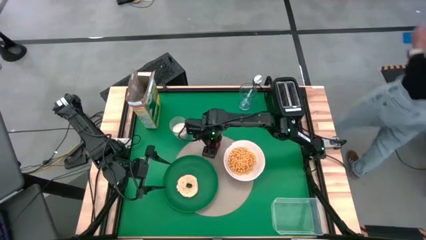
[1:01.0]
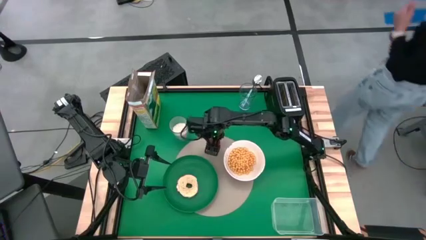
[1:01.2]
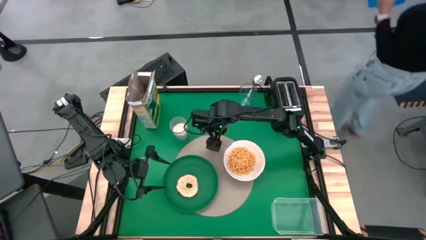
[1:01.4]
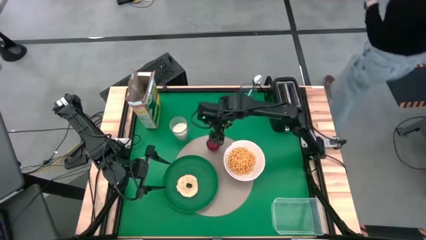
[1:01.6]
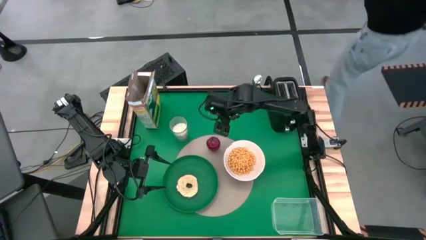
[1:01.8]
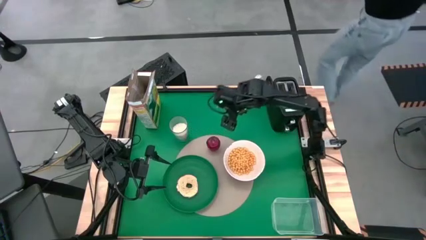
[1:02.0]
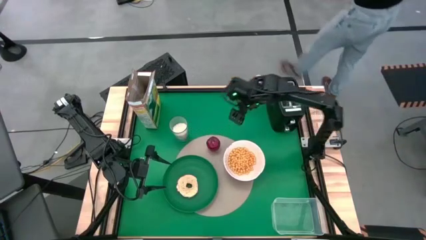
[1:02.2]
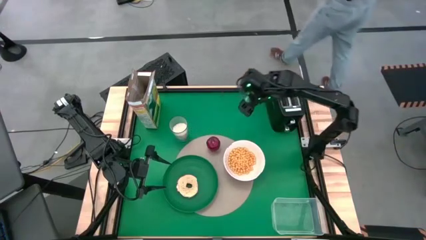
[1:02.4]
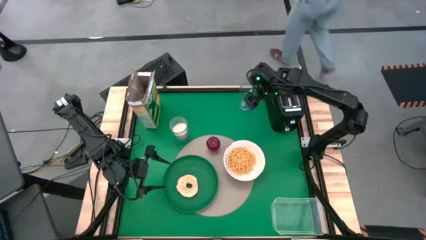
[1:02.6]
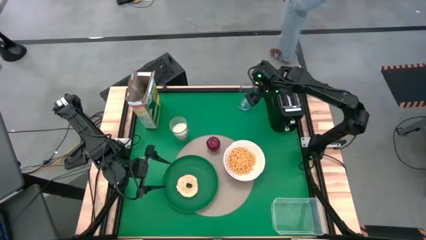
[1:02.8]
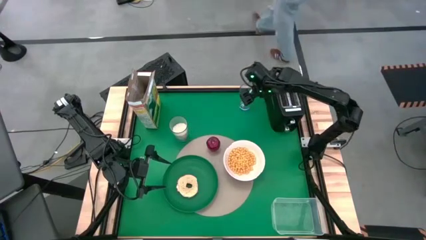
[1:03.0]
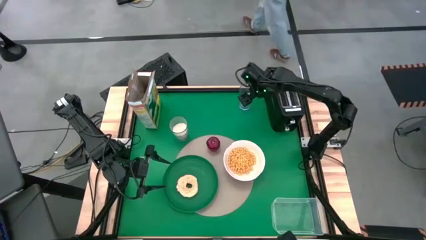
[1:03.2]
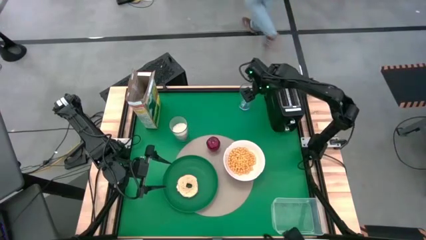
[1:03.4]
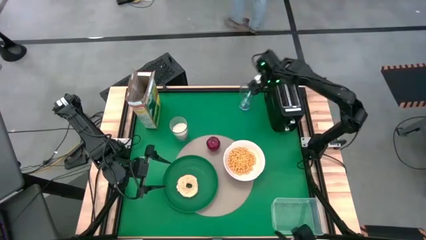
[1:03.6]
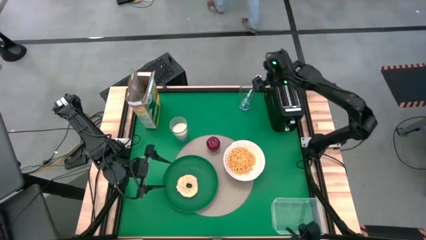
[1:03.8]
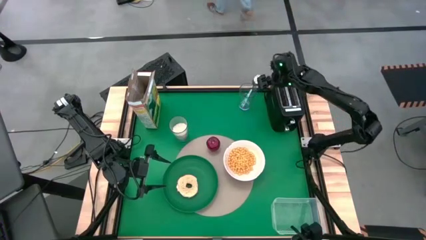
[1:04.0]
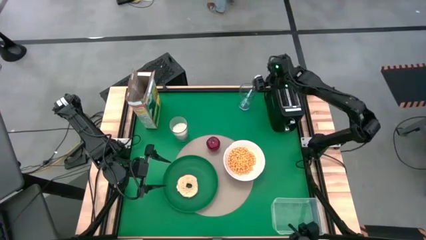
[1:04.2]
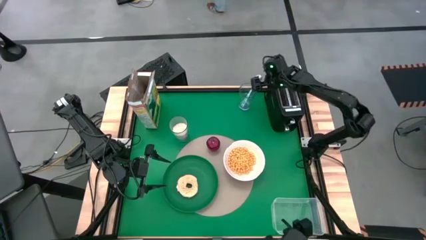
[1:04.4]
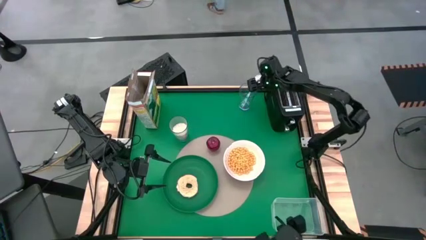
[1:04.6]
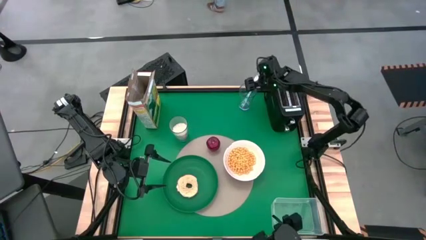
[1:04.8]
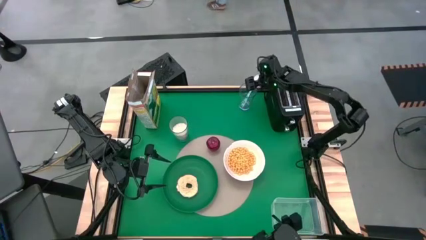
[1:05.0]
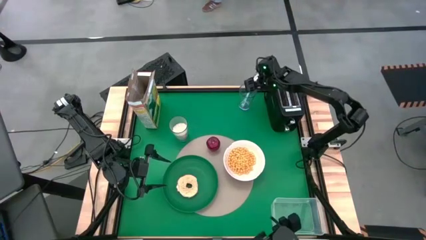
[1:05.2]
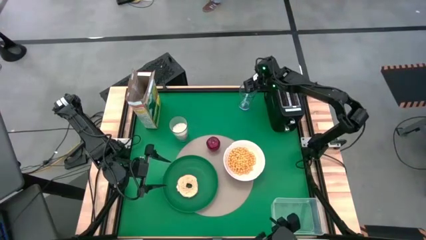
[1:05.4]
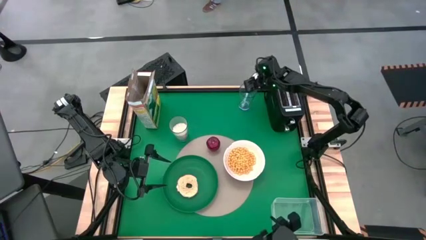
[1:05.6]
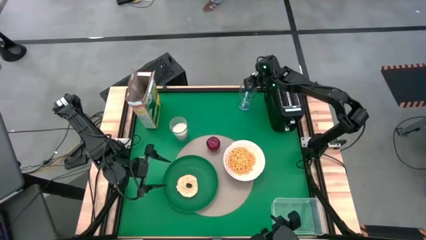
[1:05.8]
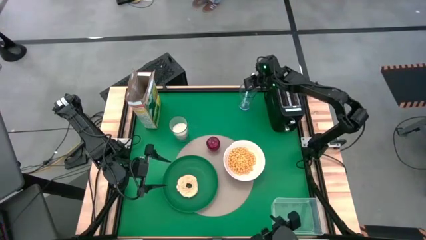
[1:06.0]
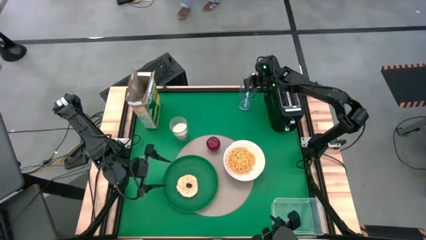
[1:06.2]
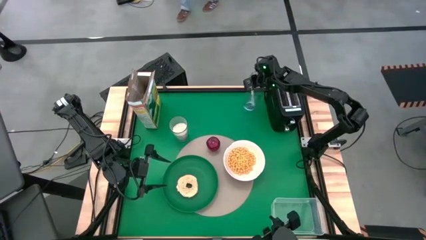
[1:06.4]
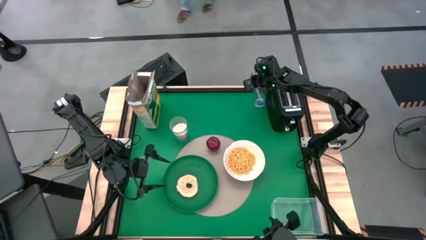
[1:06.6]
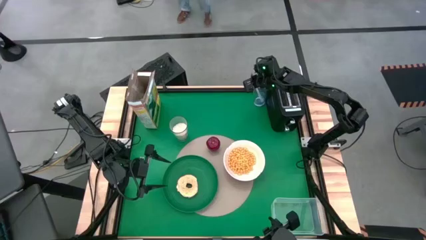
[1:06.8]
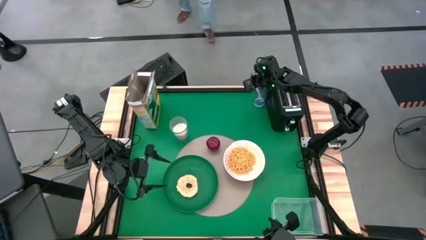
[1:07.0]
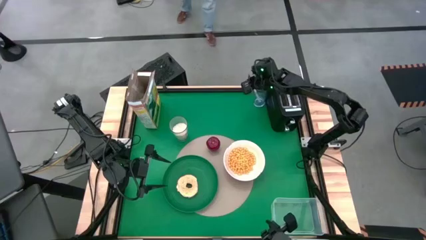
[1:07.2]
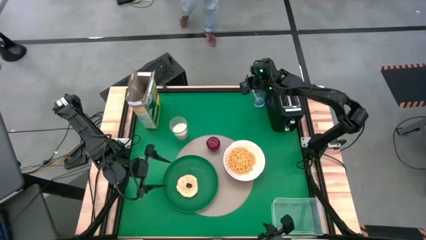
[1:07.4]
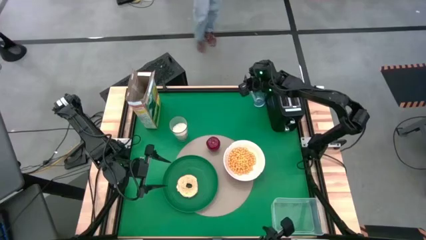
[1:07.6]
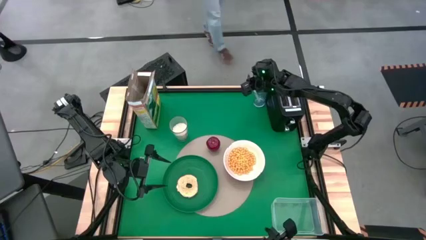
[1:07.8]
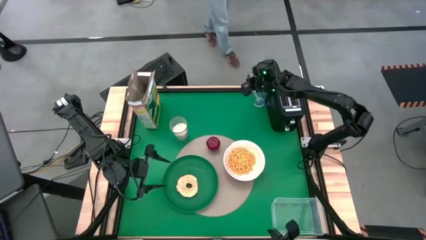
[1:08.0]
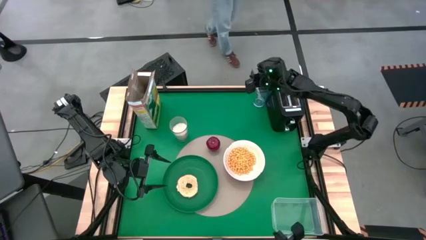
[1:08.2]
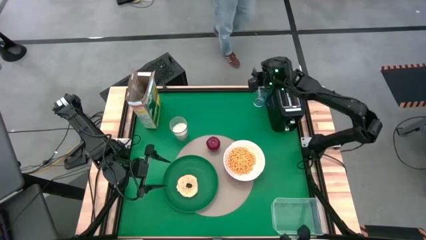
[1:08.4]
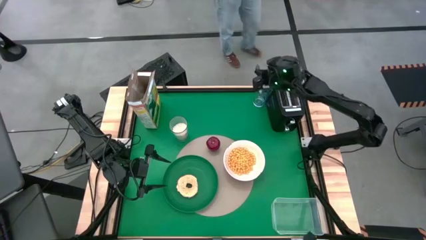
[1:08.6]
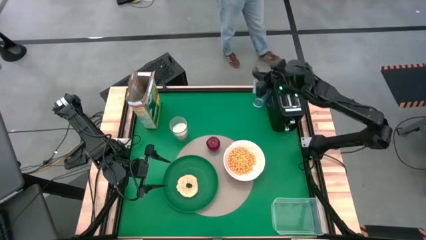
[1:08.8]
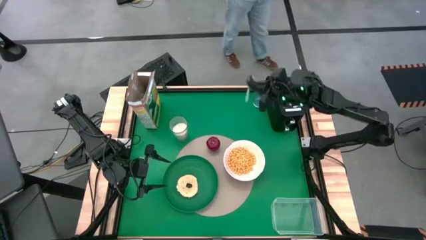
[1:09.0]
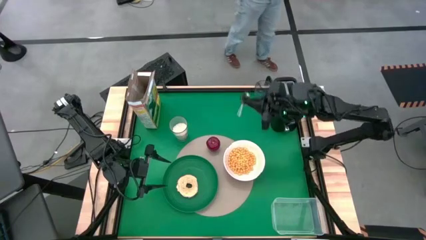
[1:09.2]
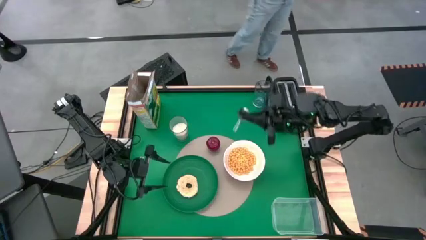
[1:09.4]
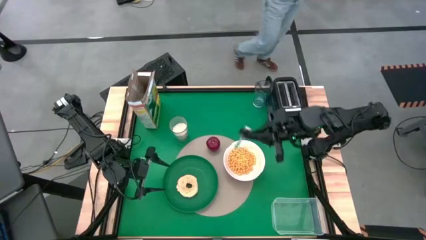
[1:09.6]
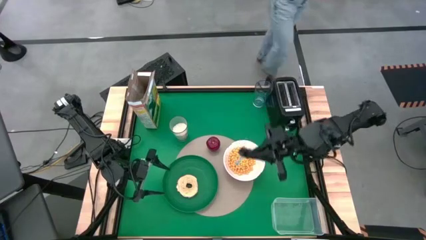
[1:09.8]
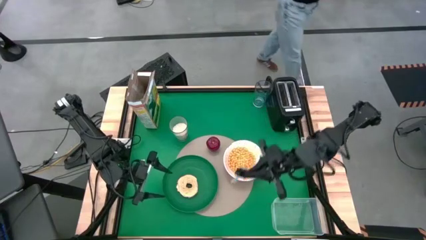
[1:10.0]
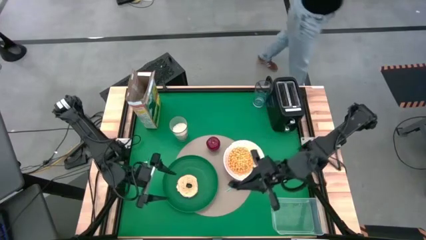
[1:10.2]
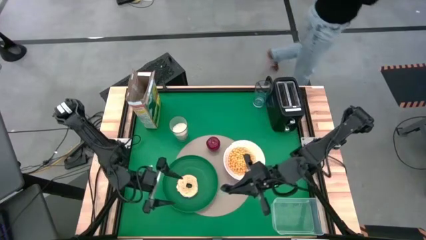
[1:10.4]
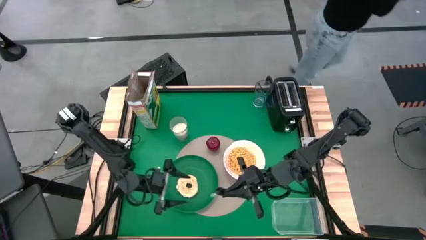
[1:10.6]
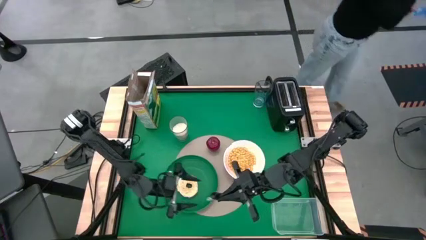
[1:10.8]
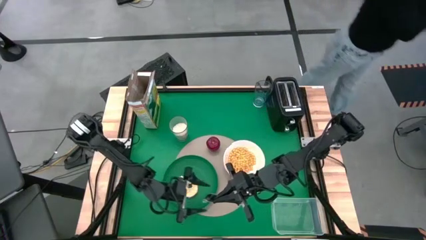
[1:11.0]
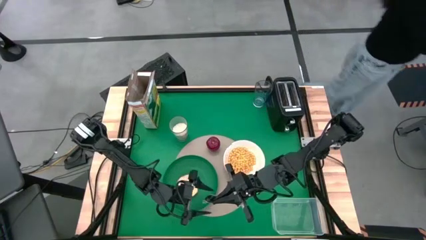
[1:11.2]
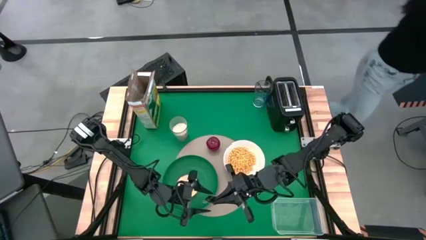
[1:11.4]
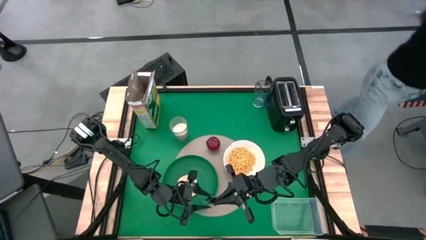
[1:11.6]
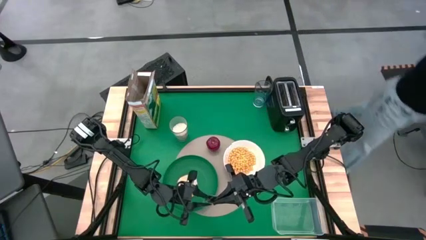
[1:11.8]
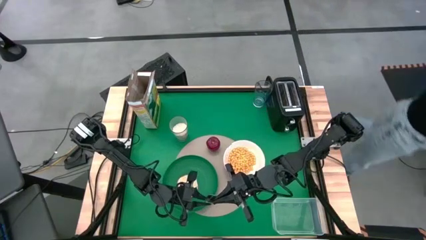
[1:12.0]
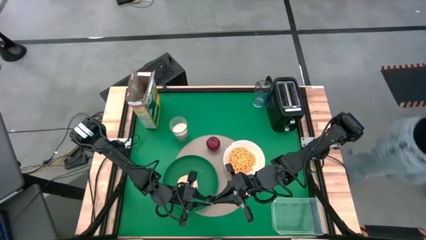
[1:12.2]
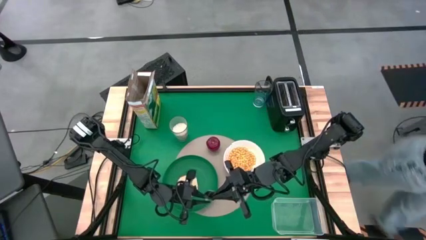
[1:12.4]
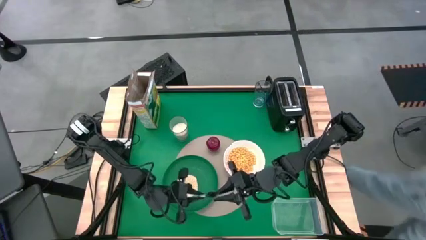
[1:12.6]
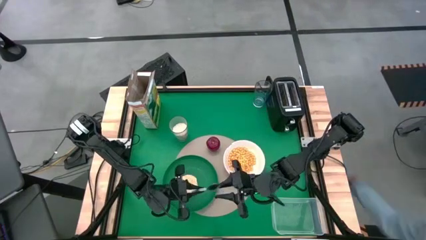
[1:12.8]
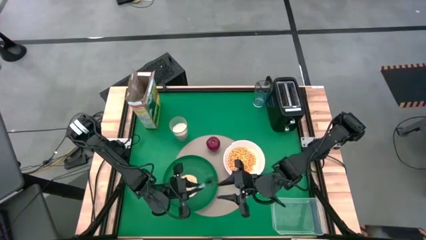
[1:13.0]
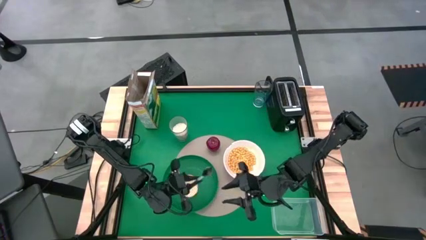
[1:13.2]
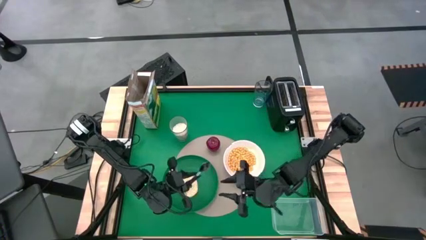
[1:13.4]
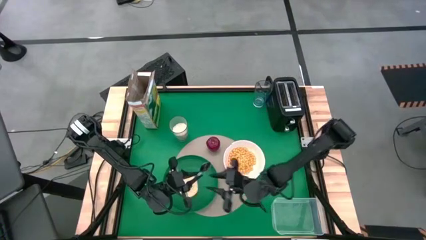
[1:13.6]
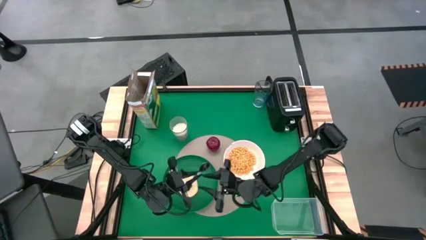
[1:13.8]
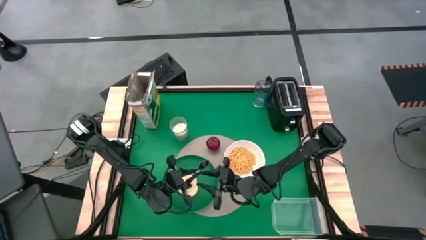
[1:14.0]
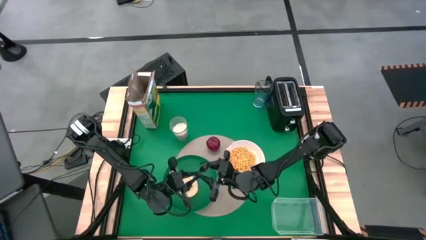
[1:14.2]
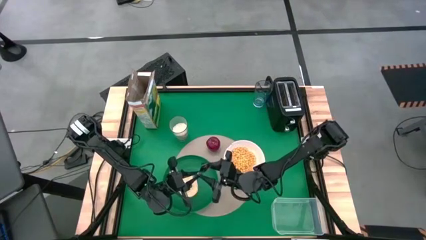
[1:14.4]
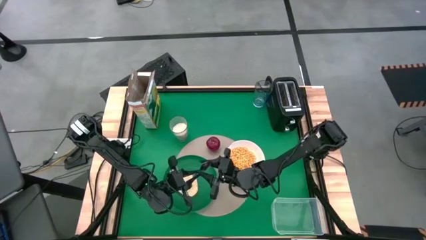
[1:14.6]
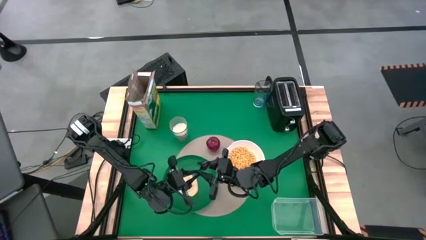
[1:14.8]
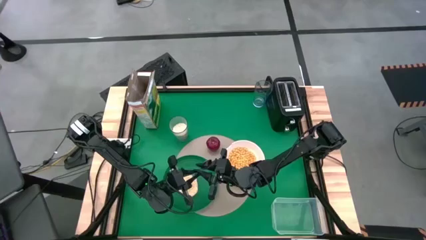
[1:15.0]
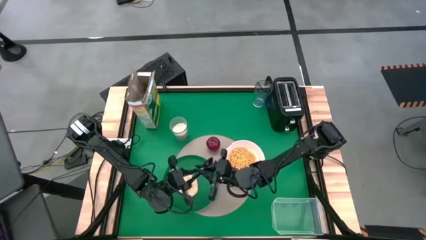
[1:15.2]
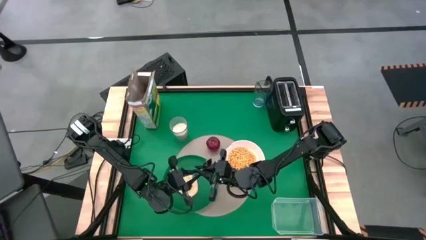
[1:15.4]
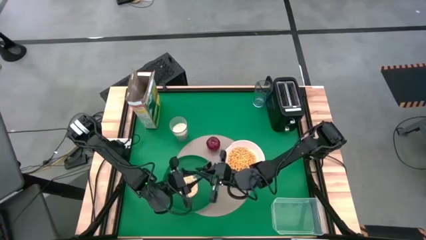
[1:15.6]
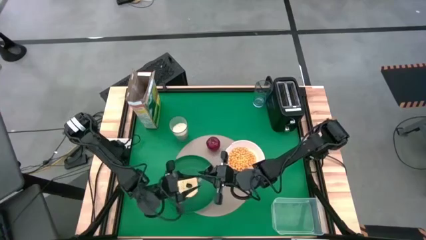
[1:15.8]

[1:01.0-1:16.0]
Task: Arrange a breakfast setting
Put the white green spoon to the right of the white bowl on the table
